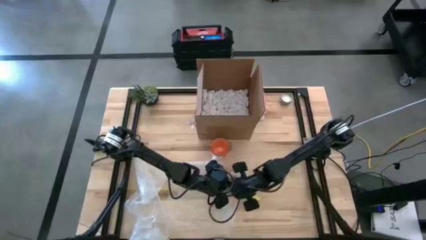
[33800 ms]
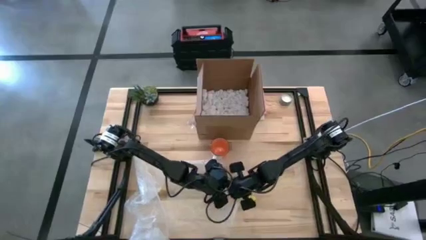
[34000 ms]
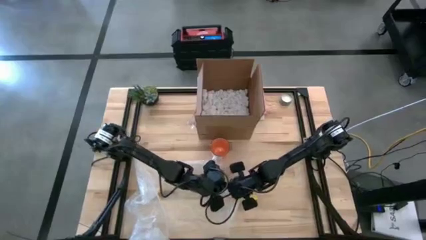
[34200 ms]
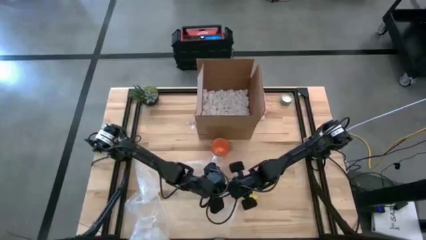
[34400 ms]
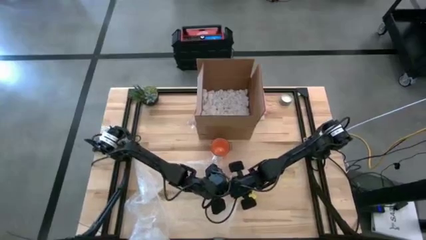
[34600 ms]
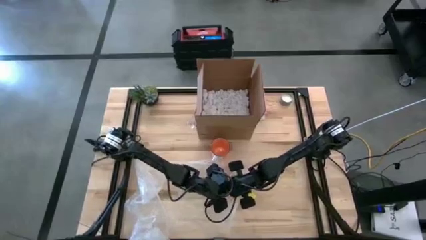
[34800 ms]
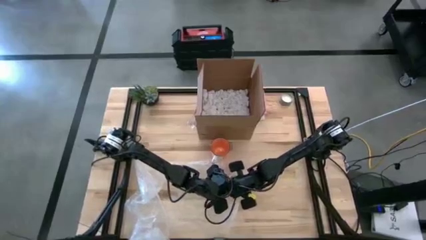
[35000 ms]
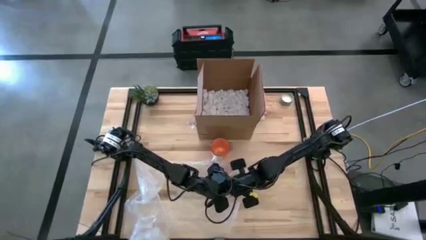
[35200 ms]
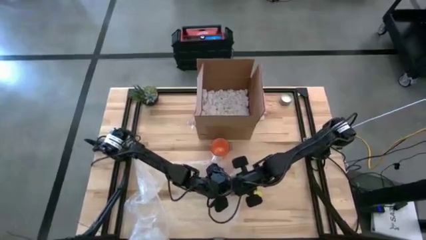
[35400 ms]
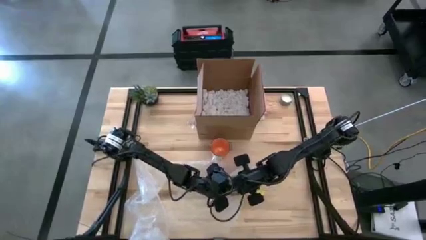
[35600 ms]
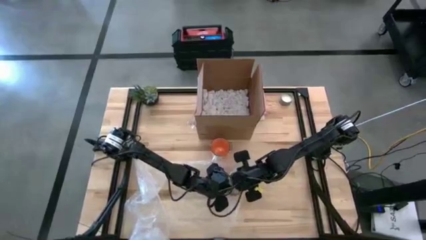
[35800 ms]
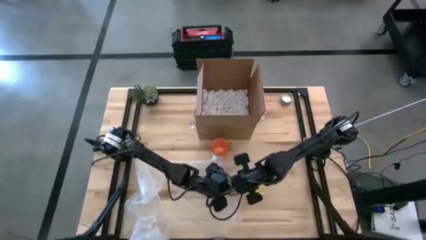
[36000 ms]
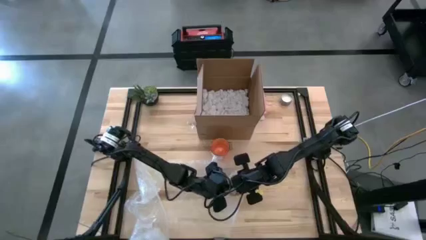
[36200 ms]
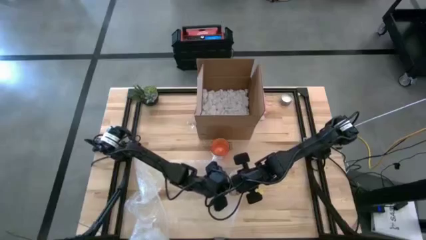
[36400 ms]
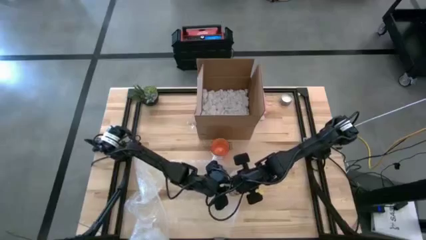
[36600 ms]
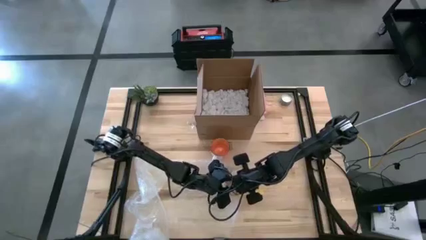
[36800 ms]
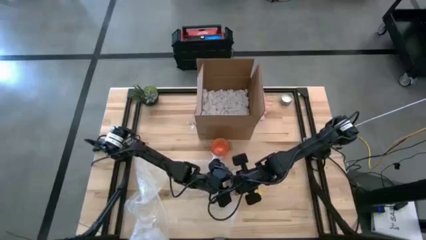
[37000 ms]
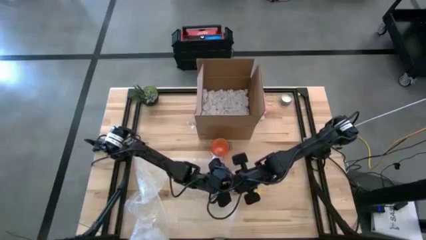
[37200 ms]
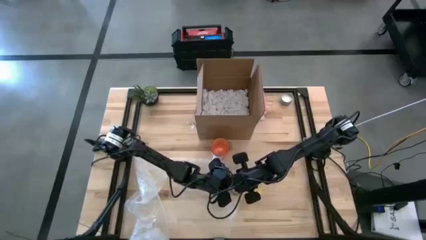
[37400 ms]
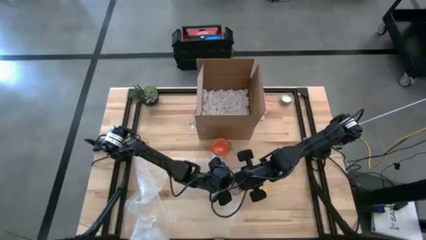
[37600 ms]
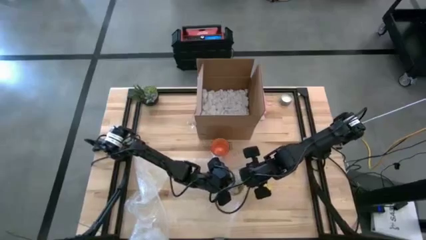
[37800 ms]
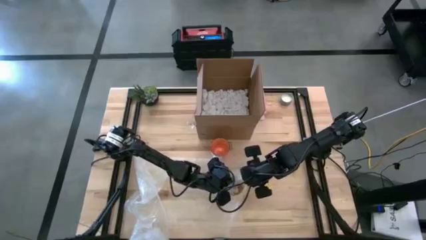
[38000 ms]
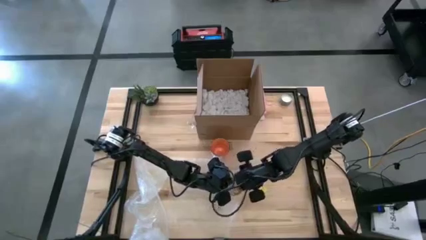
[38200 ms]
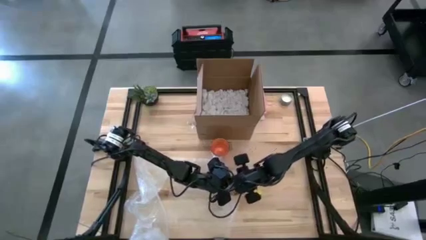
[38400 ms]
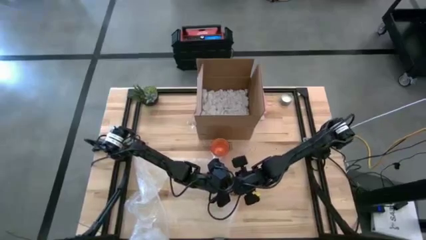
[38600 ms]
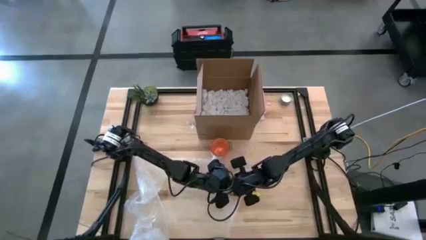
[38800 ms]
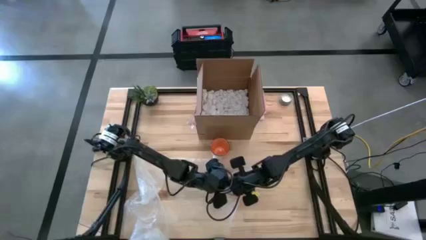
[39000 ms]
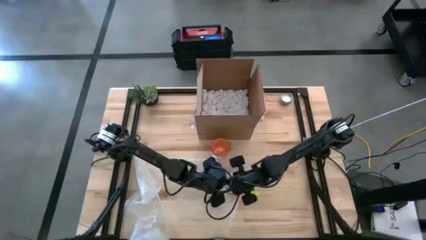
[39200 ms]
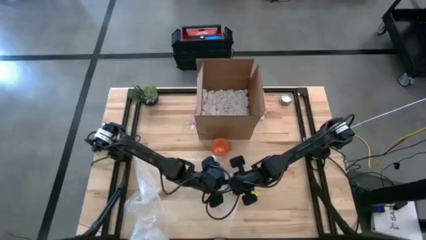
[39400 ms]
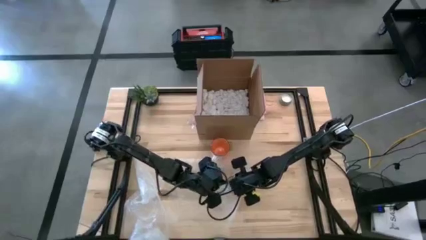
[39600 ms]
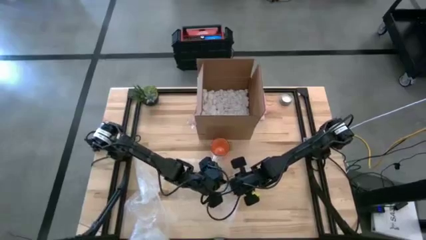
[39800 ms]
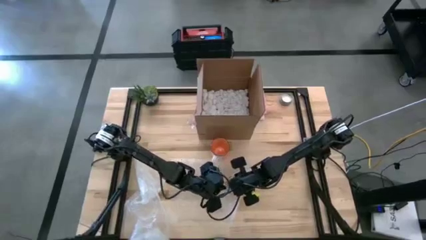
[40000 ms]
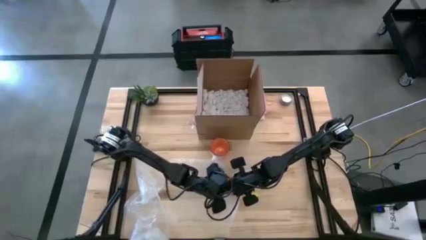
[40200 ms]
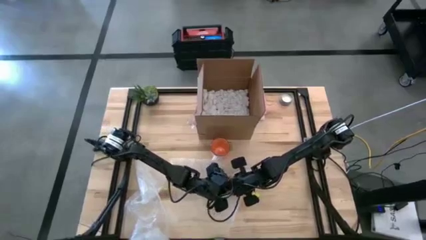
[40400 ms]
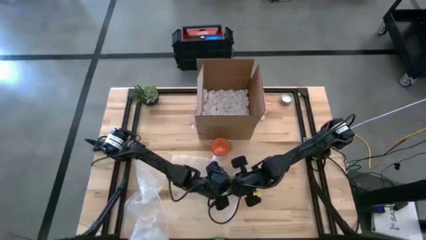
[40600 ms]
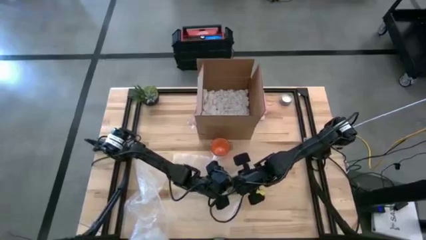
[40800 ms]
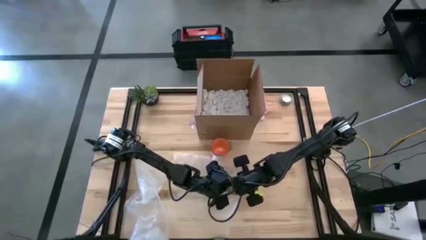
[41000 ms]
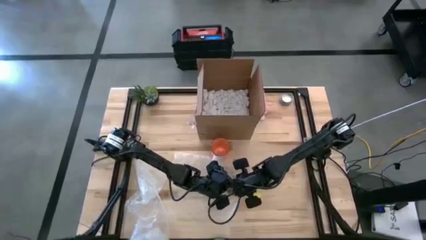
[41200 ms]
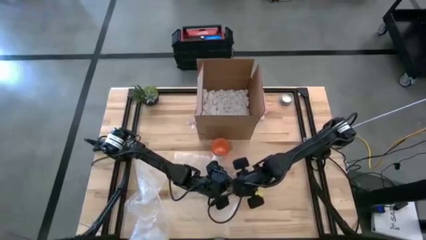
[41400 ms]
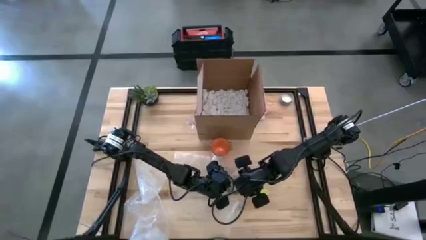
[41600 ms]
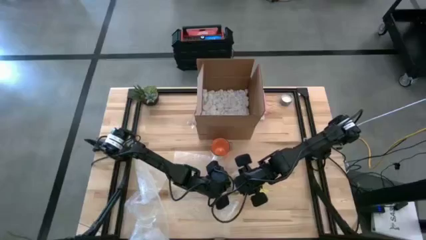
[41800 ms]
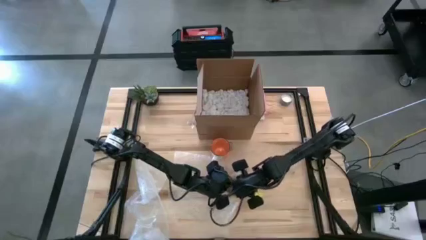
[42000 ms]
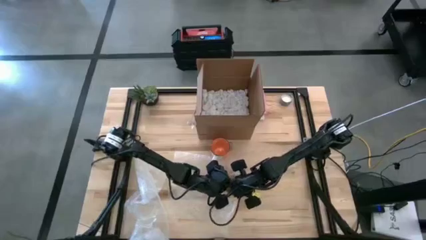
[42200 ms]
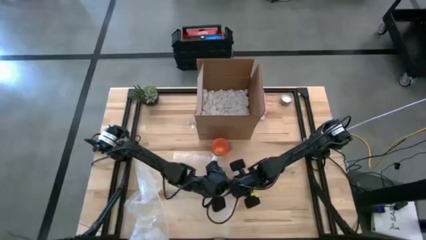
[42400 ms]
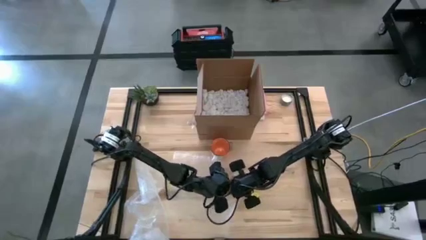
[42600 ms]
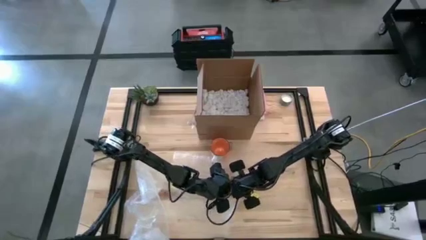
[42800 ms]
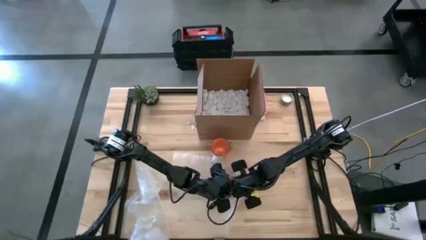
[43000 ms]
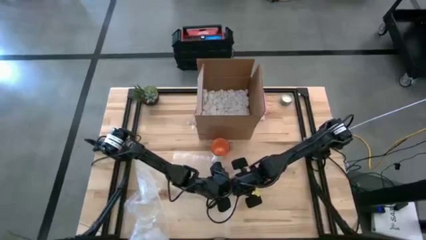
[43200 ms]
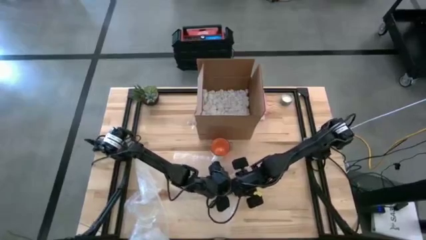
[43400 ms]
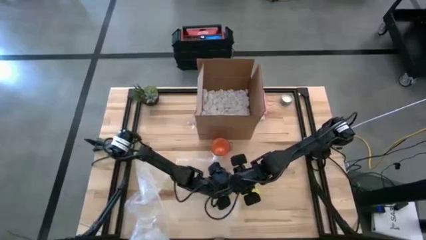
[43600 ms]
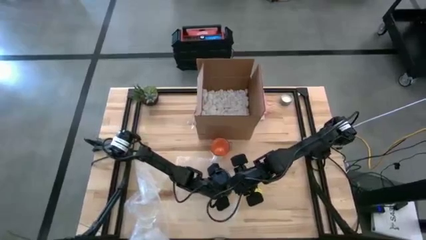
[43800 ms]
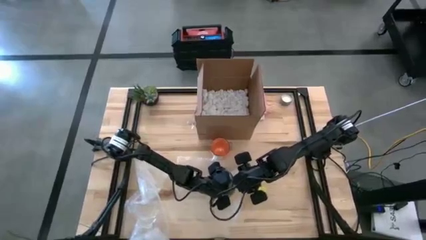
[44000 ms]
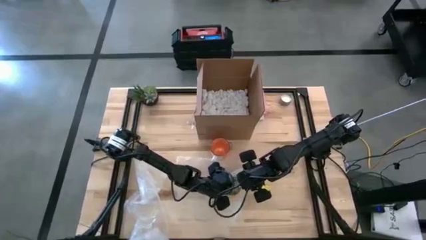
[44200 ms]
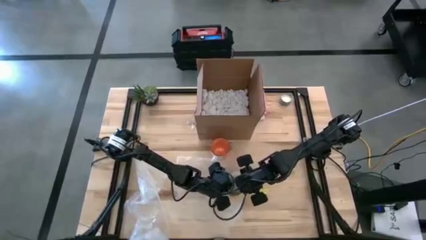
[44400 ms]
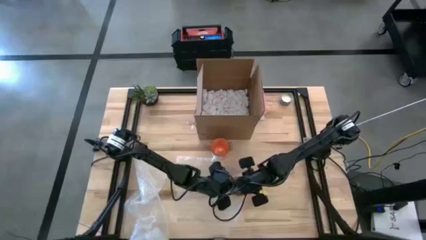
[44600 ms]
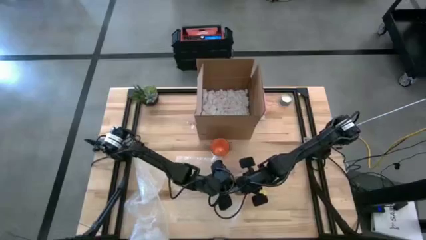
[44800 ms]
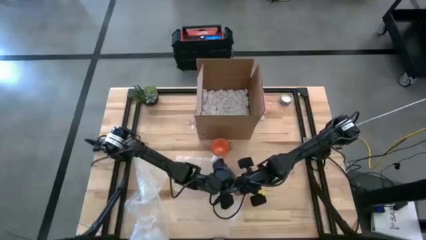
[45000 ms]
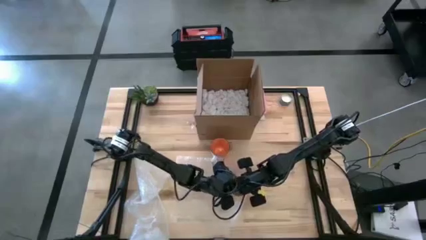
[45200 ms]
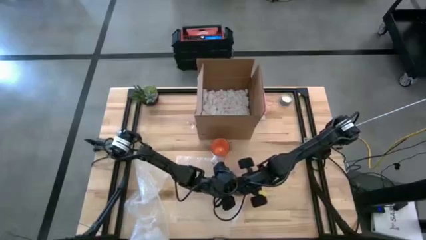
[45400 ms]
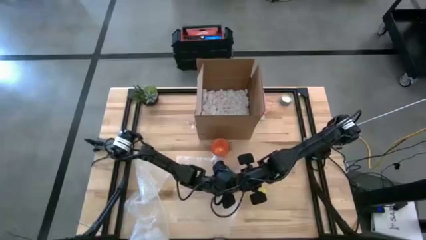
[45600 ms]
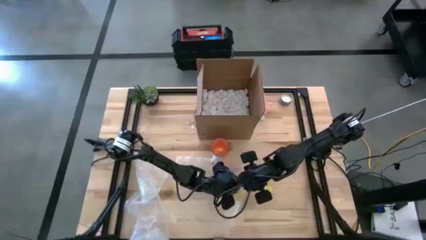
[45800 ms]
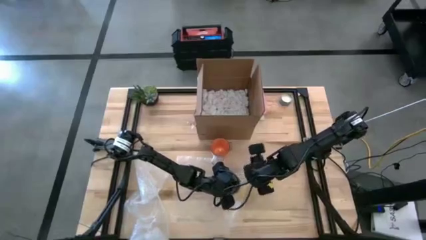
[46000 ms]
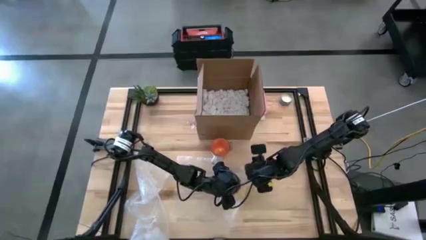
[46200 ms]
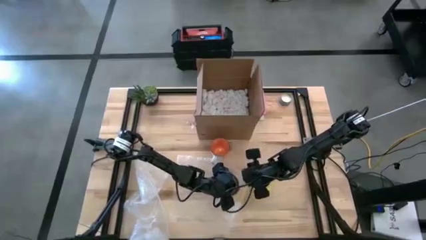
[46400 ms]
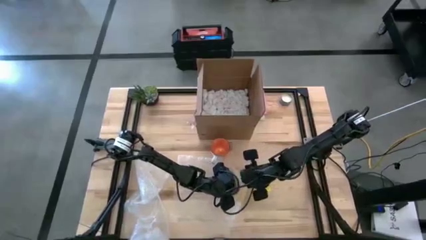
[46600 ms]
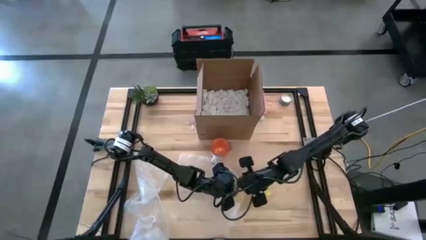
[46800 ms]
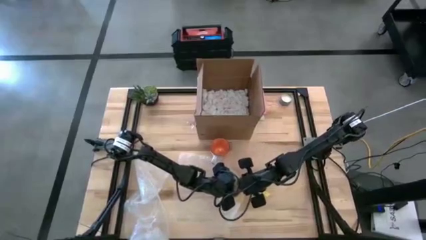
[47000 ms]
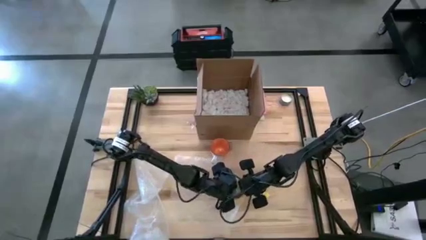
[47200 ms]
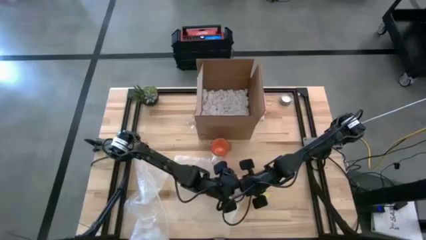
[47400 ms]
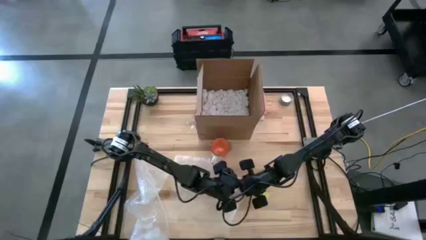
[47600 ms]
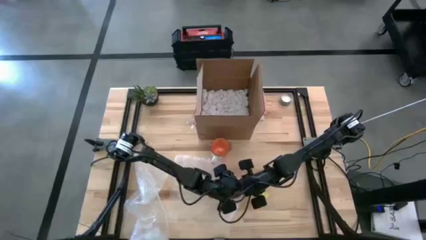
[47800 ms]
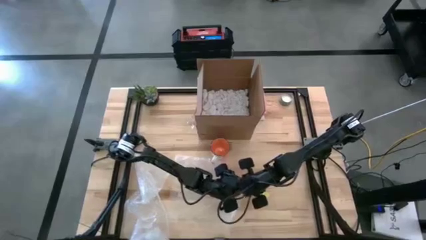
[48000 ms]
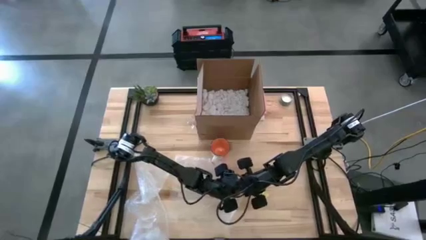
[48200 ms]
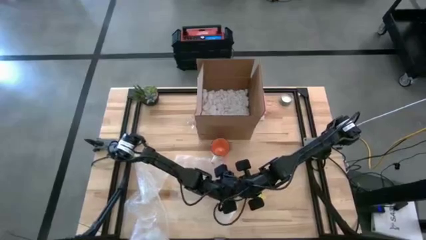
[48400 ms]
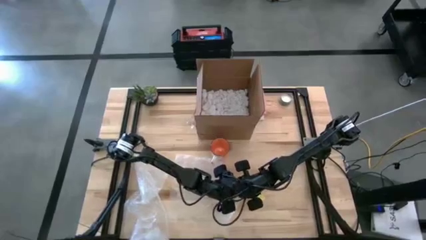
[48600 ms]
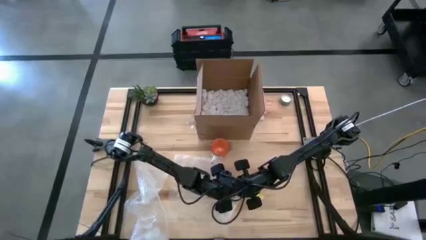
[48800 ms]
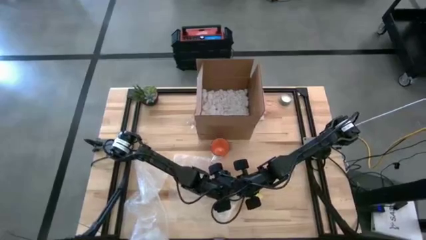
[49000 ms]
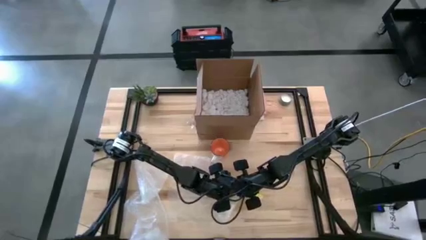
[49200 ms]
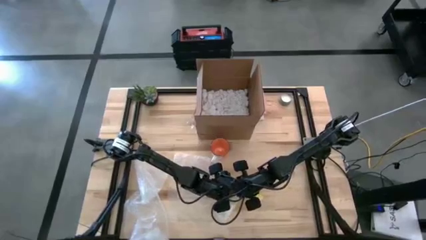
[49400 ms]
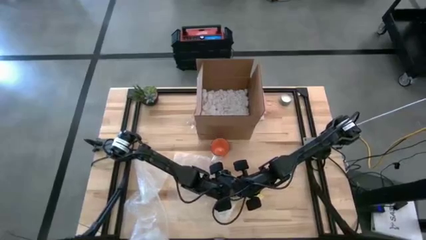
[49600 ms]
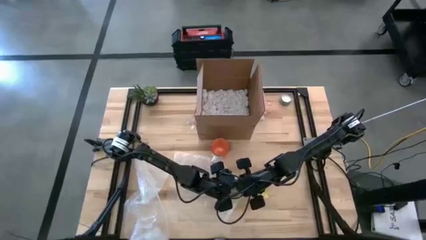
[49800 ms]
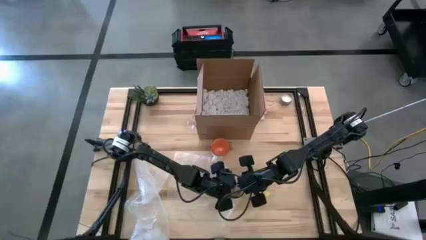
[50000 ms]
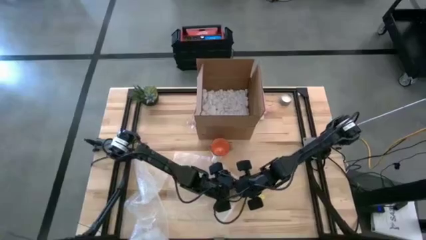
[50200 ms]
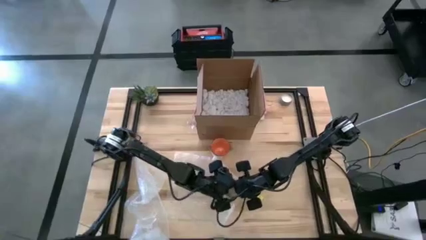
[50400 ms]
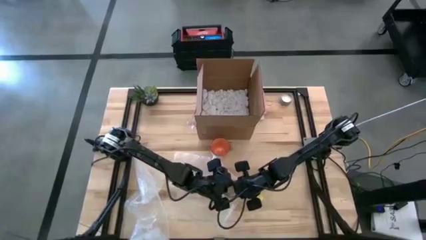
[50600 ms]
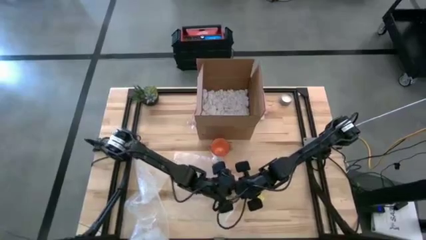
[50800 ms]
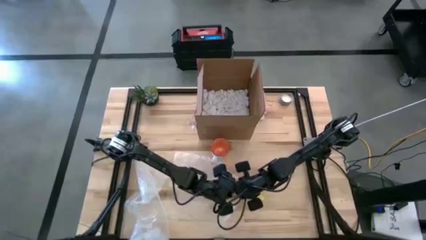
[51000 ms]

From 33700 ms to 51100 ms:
Task: wrap mug
Wrap the yellow mug with the transparent bubble wrap
